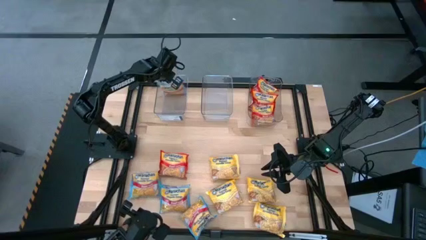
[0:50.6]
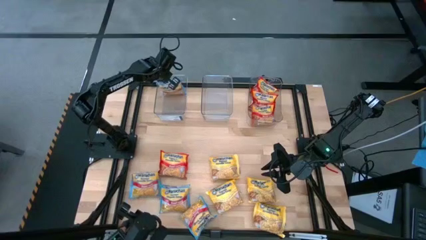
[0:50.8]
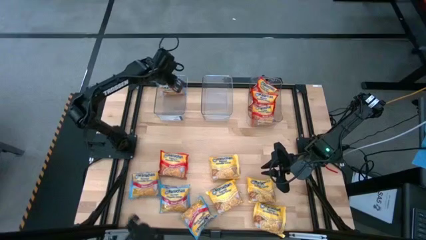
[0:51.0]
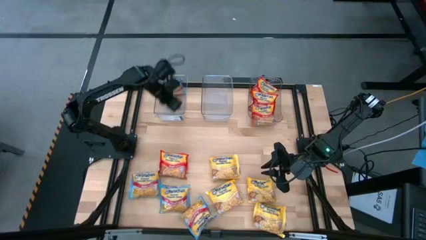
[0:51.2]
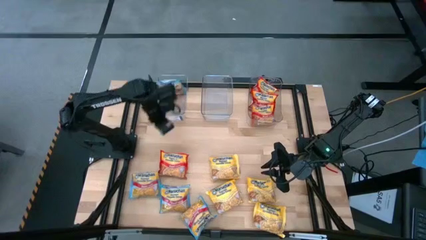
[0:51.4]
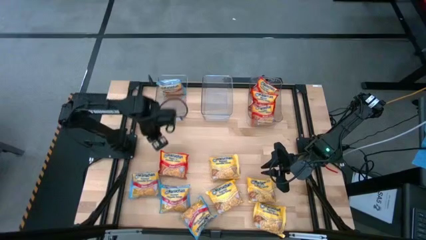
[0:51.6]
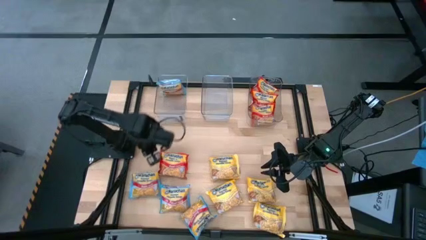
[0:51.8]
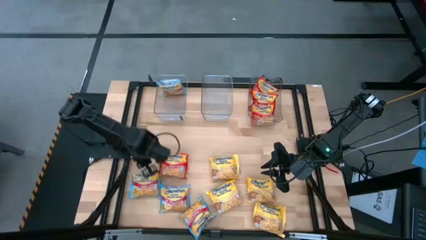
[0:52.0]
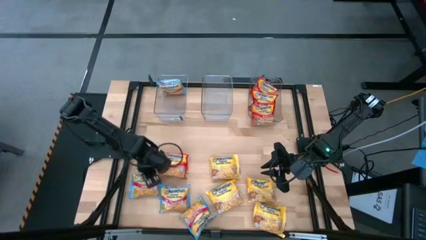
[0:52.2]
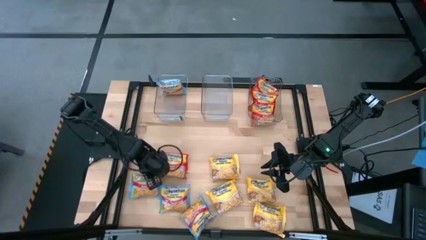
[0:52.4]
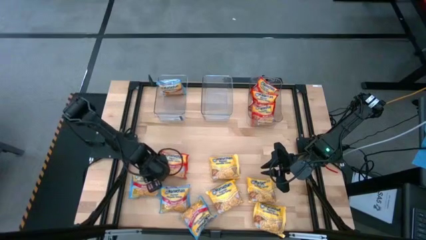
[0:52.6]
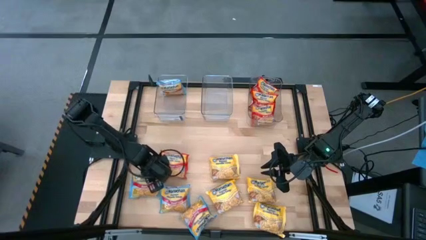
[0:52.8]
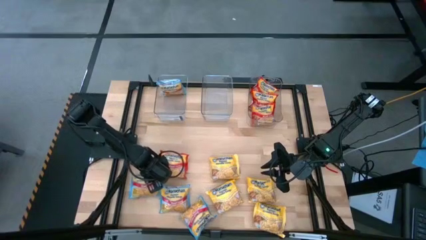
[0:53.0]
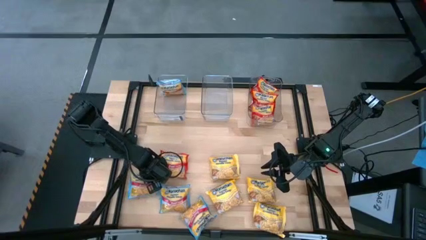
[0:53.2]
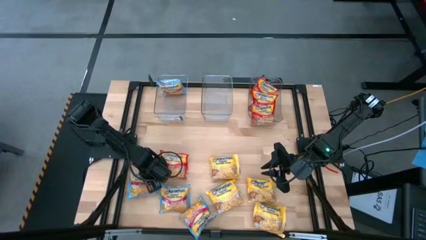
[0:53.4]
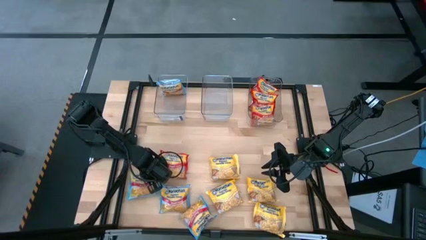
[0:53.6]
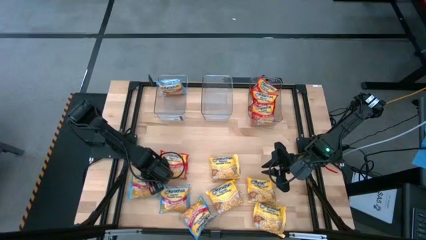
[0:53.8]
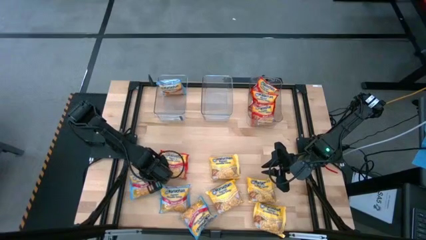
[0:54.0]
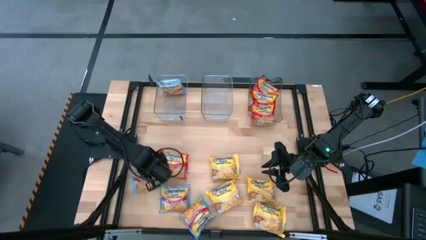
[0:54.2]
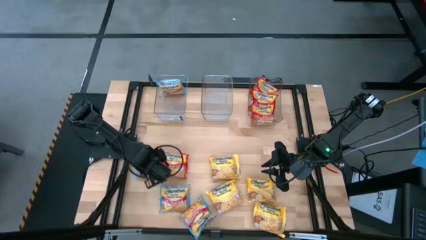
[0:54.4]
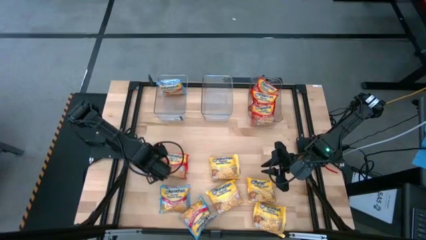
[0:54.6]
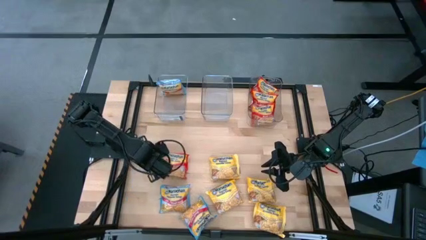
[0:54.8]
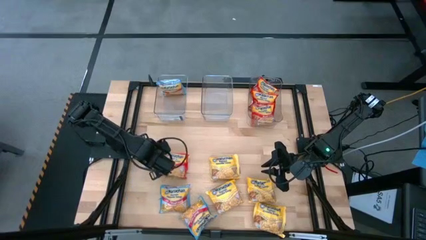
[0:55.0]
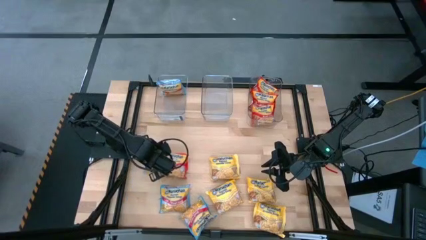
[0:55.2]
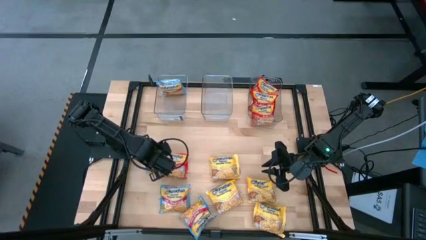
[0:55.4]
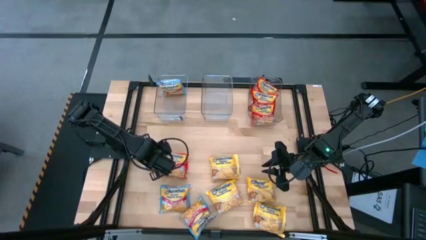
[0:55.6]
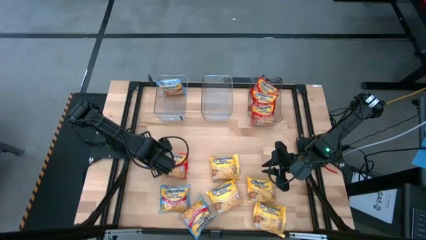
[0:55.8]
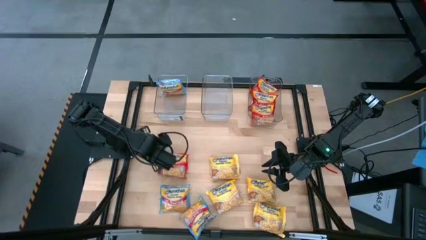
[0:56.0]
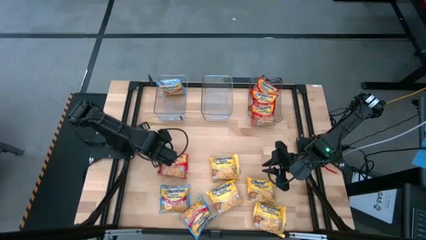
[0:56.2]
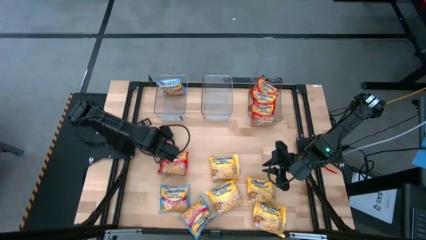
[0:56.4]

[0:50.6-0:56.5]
Task: Sort Maruchan noodles
Put the blue noodle pack into the left transparent bin

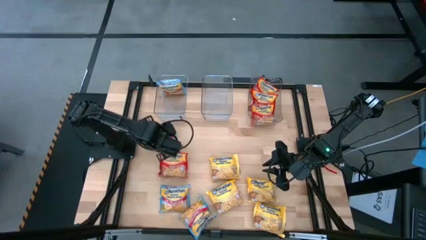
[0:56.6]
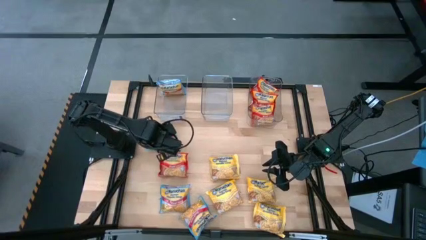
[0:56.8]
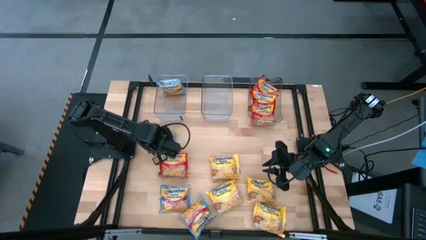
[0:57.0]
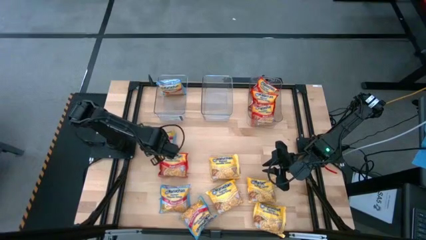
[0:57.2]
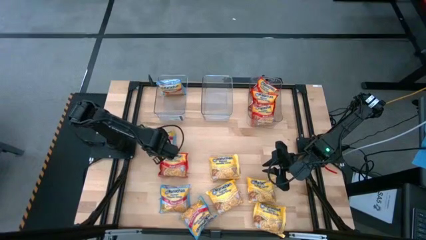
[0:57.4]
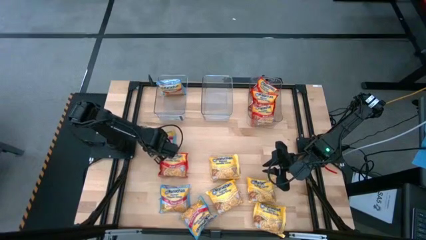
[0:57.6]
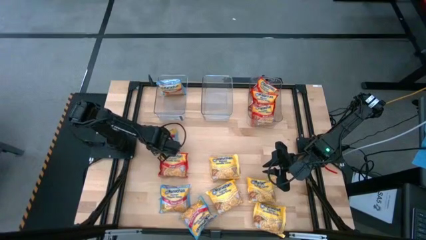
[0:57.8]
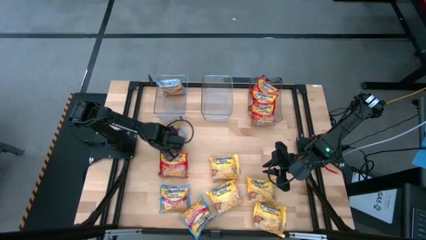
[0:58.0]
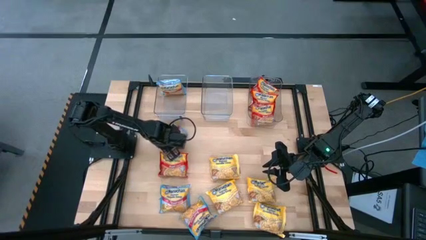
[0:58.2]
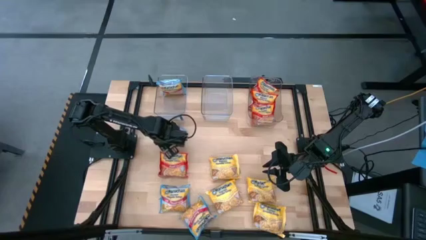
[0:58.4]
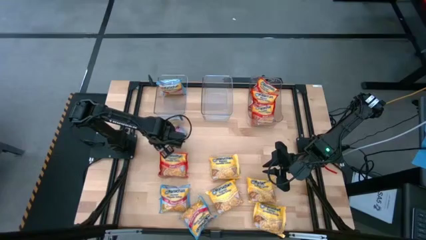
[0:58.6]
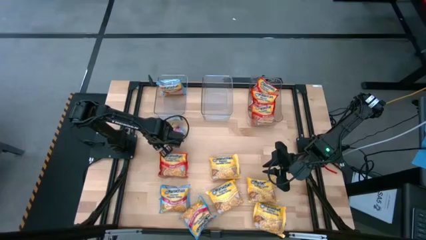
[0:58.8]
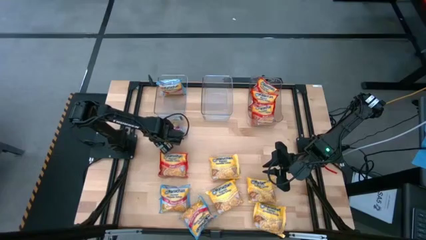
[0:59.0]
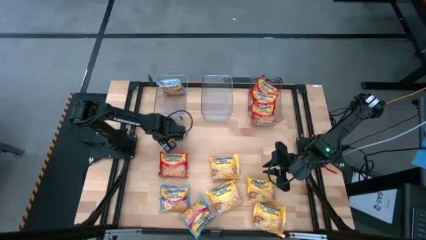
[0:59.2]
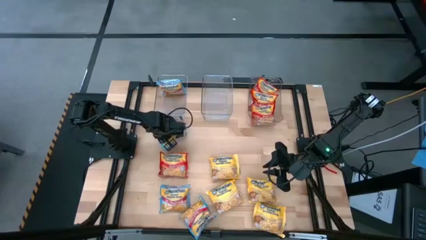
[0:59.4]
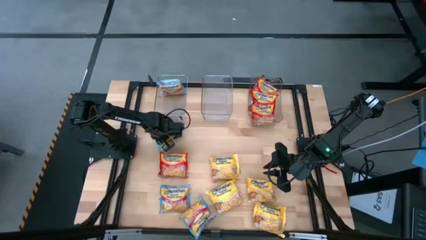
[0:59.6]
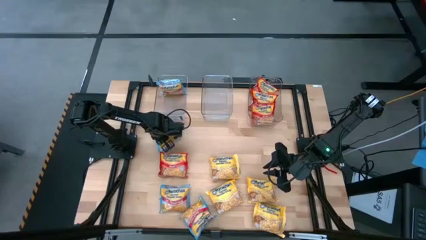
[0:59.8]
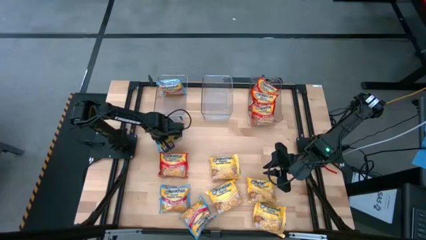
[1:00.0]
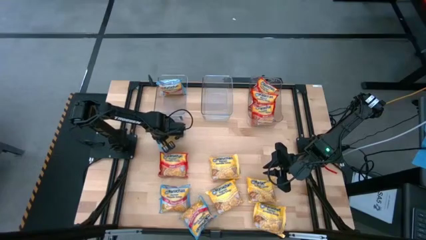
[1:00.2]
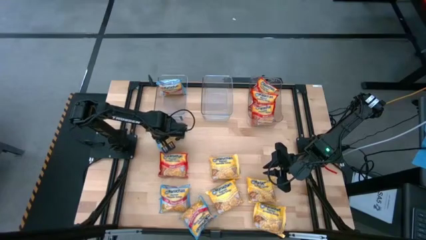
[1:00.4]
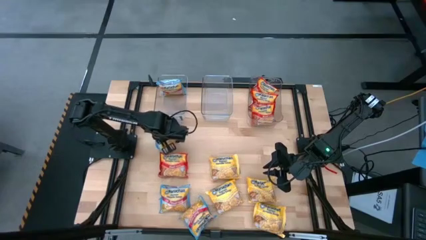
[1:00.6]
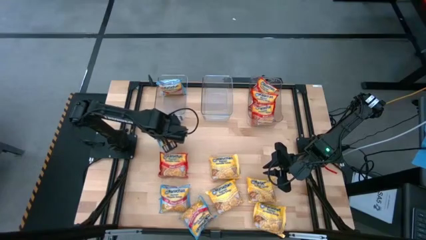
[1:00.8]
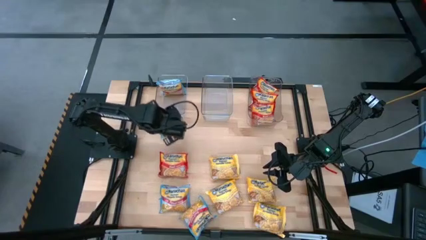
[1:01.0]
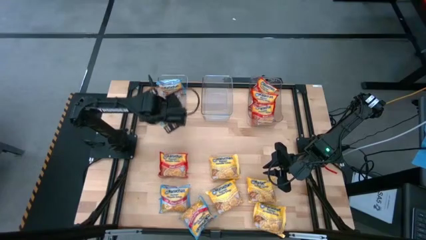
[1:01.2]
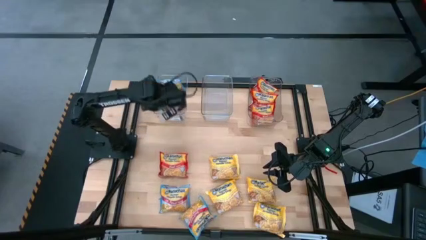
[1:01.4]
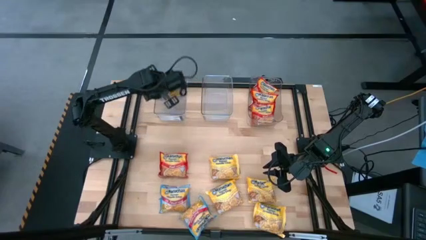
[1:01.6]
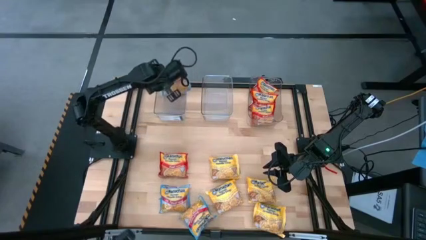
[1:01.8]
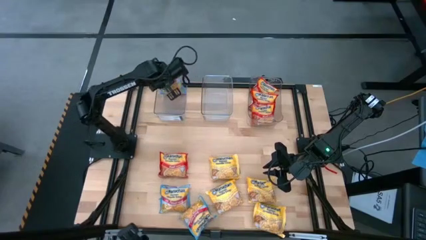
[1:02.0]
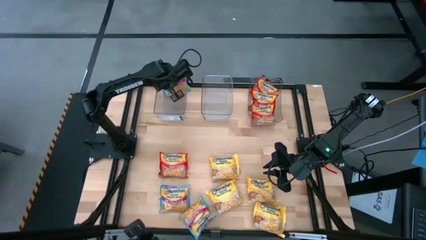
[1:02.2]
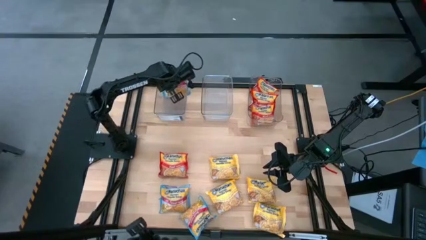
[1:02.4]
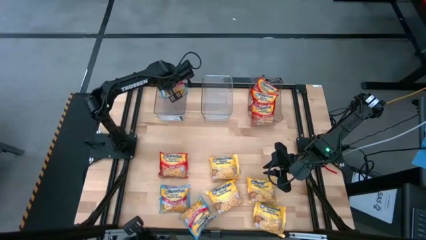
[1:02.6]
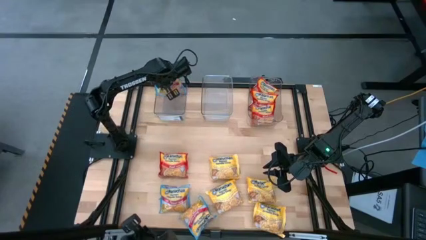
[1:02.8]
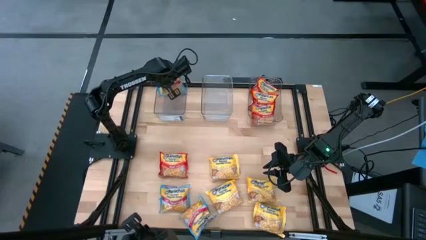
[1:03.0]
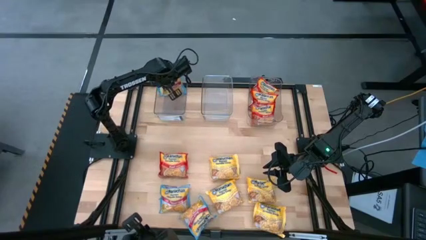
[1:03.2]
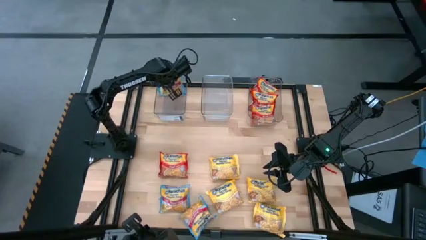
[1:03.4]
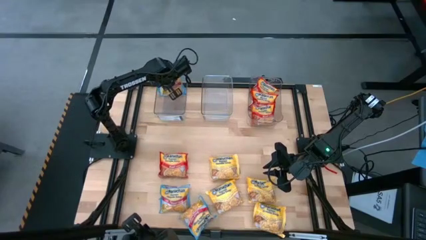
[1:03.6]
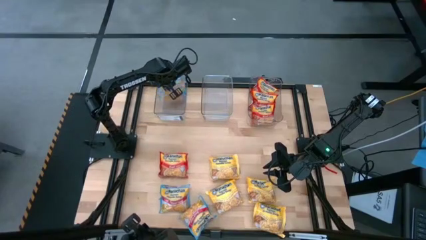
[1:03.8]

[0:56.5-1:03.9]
Put the blue noodle pack into the transparent bin

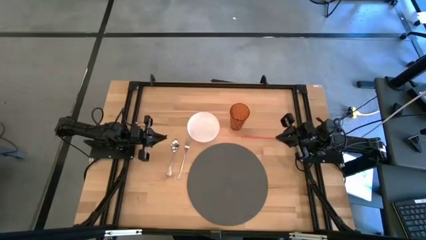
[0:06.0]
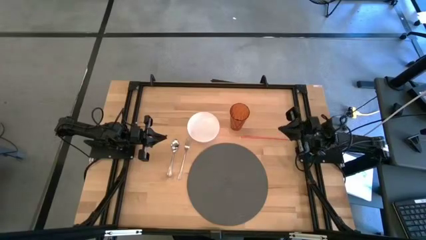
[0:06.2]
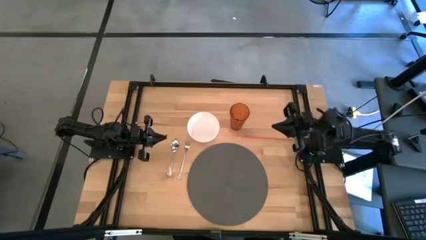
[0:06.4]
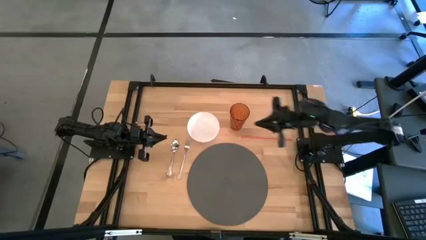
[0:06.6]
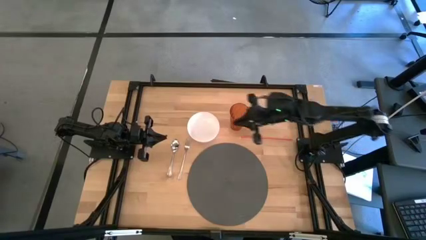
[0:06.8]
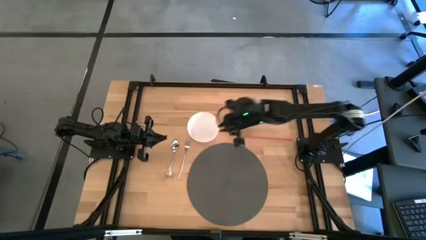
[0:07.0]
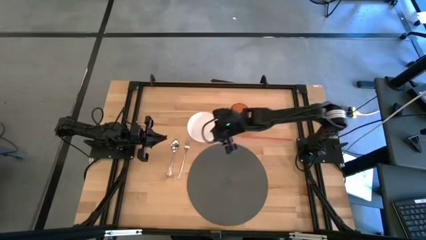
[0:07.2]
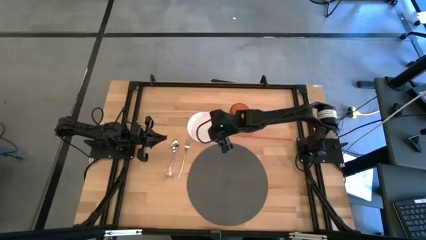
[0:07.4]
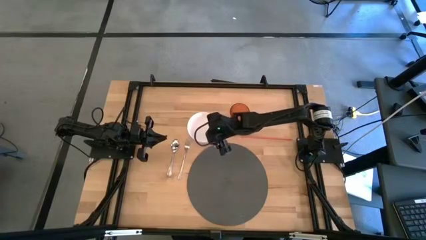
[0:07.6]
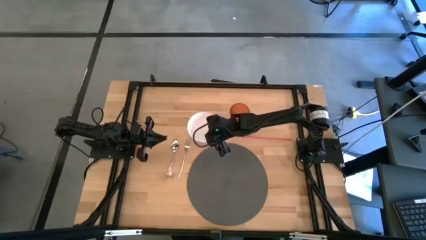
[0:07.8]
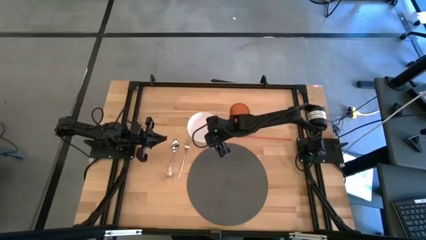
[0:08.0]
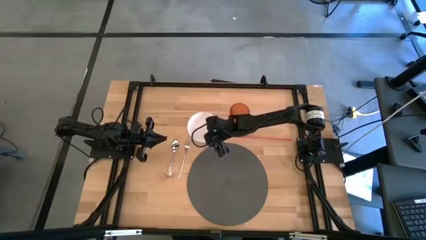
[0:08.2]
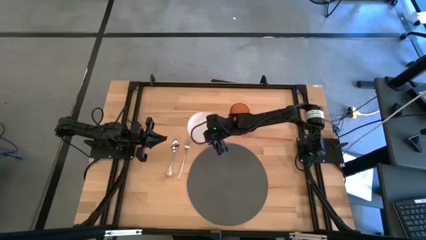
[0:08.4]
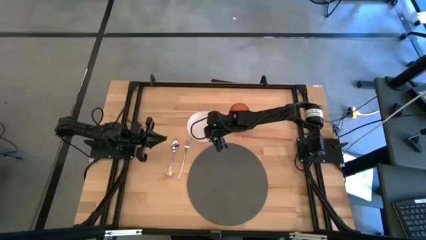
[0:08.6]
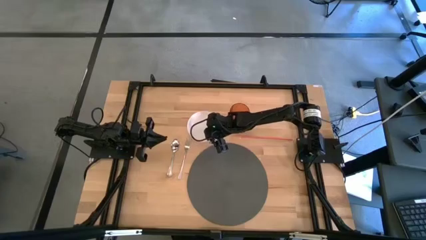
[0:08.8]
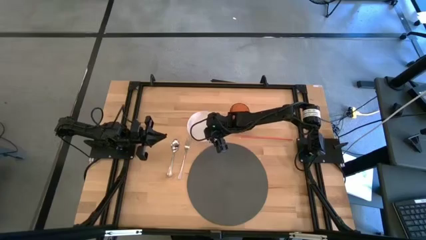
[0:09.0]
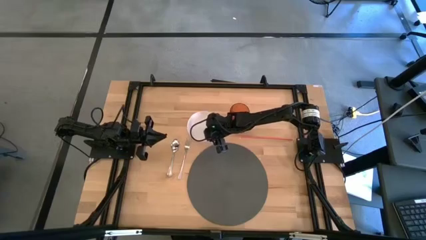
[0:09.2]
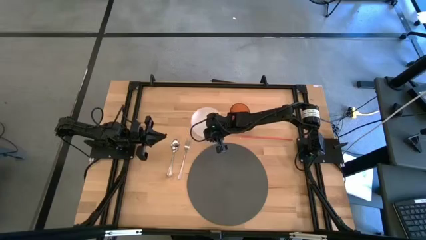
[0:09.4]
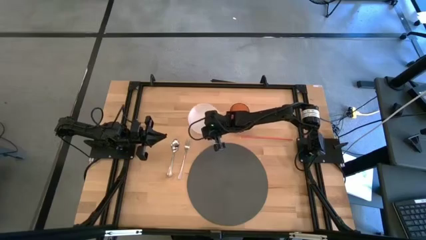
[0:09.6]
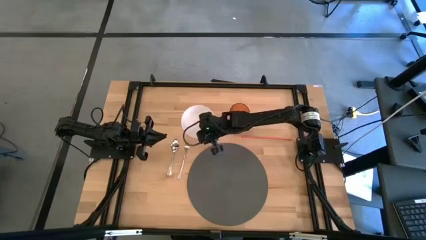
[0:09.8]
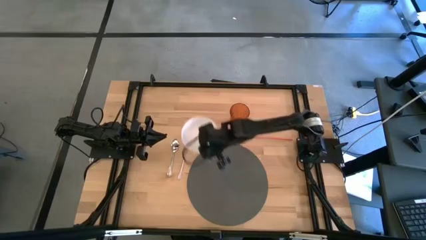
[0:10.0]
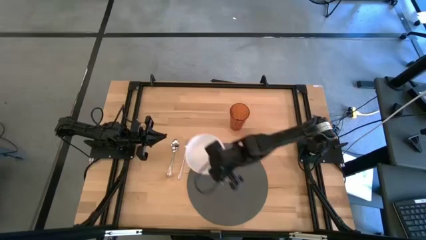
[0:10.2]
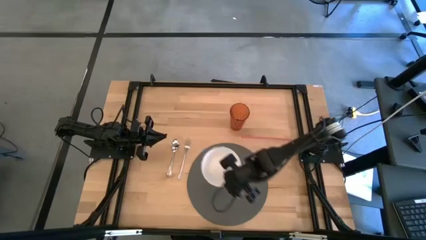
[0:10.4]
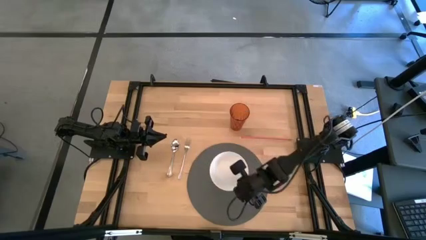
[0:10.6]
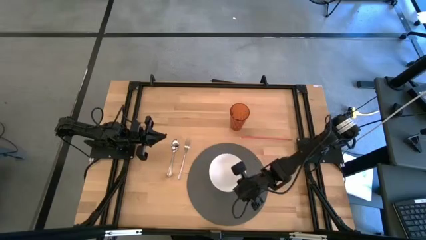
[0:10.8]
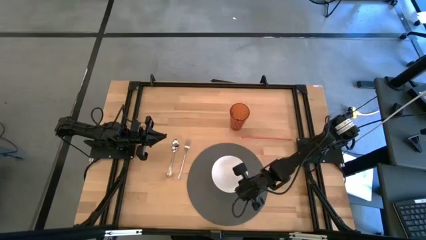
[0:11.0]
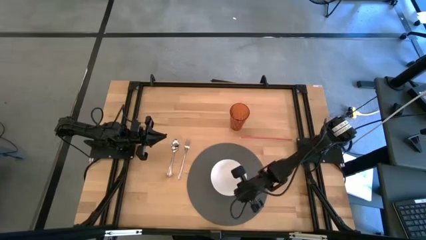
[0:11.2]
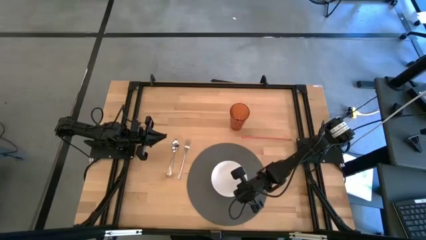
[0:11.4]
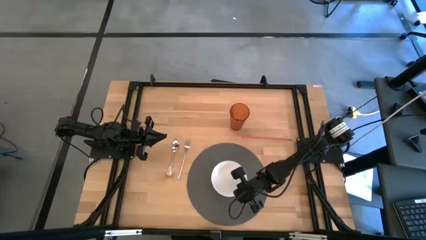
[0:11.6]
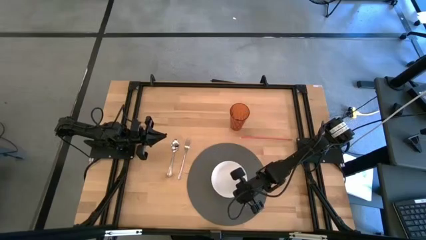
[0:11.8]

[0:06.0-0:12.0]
Task: Pick & Place Utensil
Put the white bowl on the gray mat
